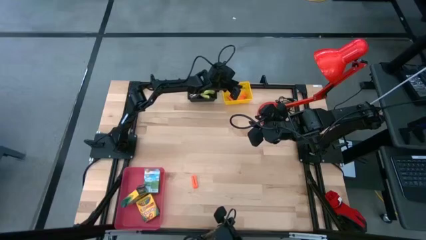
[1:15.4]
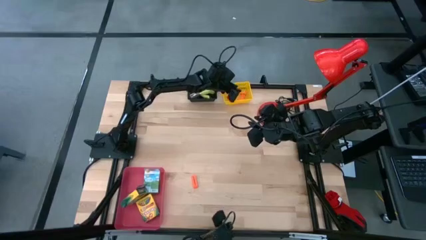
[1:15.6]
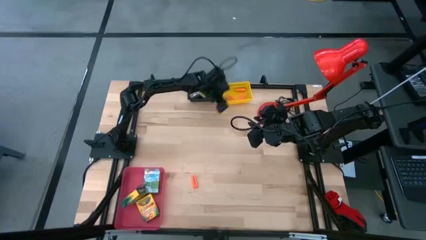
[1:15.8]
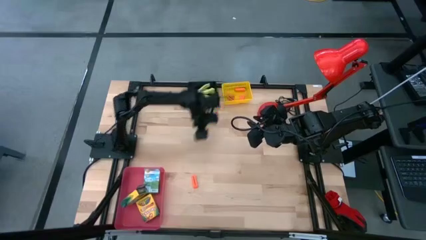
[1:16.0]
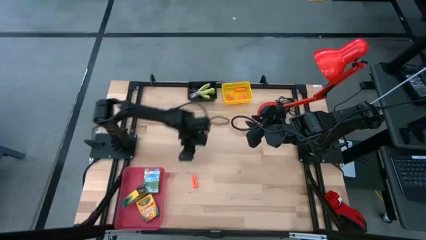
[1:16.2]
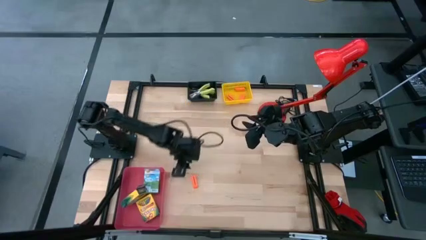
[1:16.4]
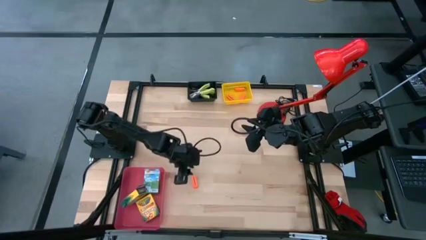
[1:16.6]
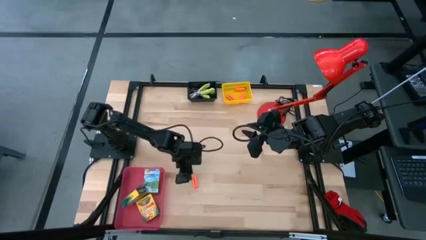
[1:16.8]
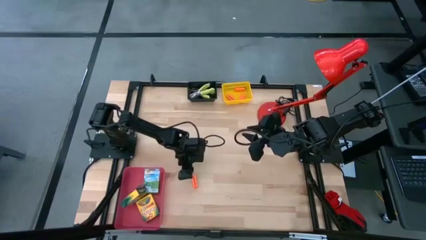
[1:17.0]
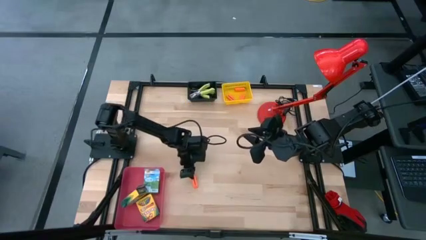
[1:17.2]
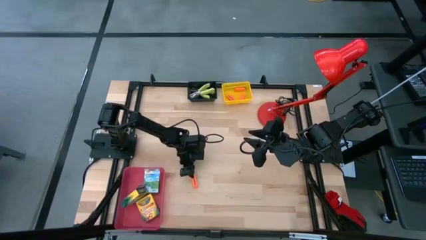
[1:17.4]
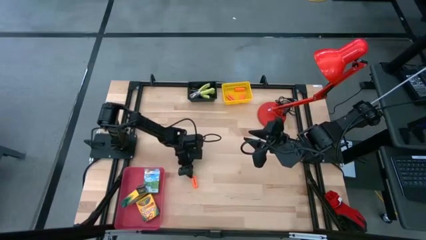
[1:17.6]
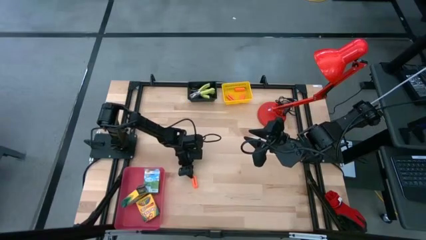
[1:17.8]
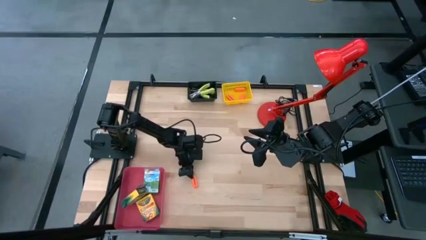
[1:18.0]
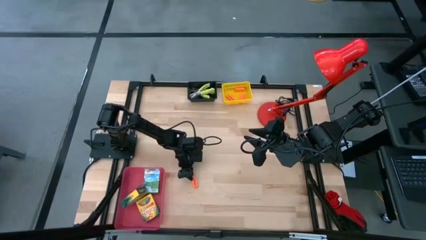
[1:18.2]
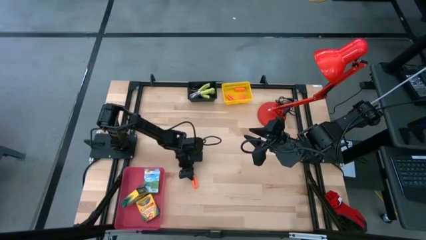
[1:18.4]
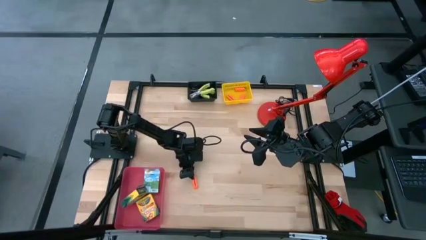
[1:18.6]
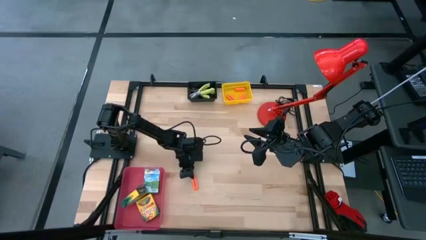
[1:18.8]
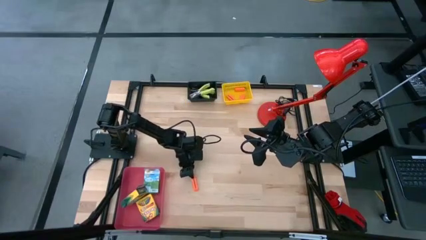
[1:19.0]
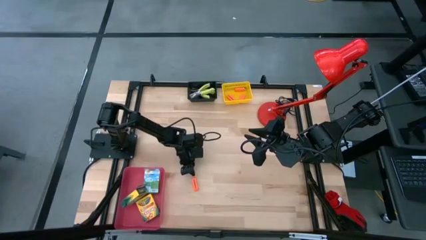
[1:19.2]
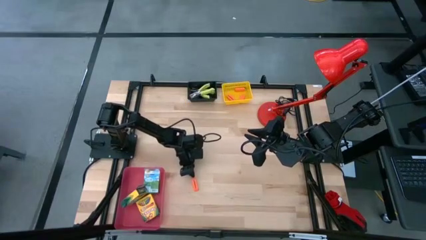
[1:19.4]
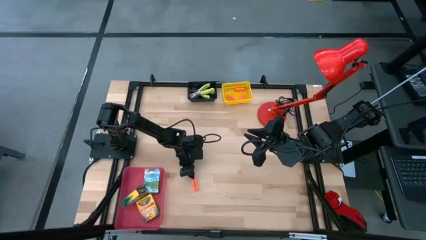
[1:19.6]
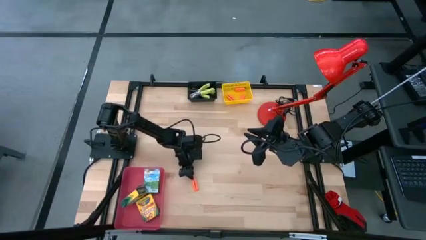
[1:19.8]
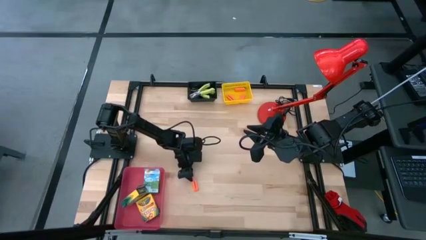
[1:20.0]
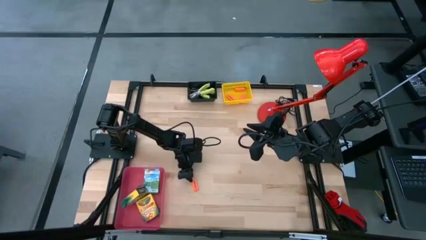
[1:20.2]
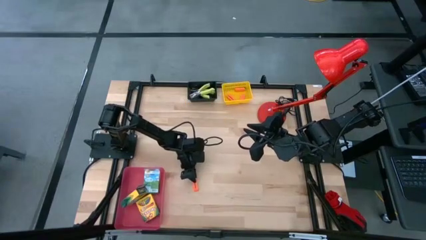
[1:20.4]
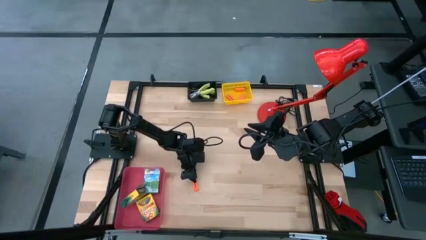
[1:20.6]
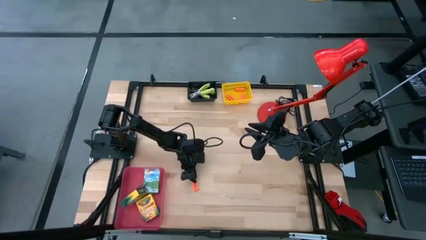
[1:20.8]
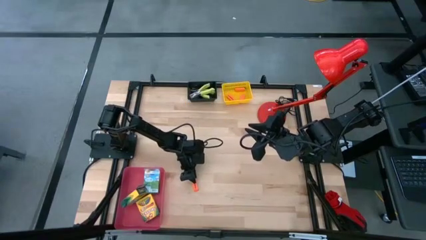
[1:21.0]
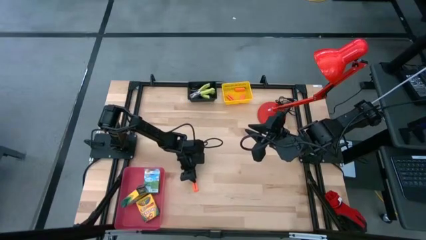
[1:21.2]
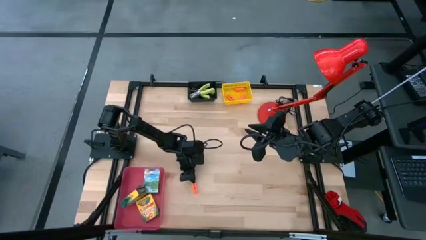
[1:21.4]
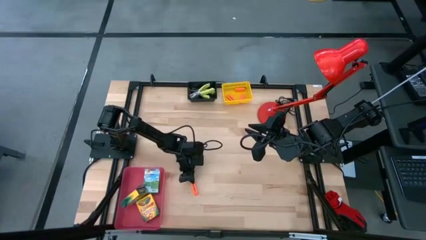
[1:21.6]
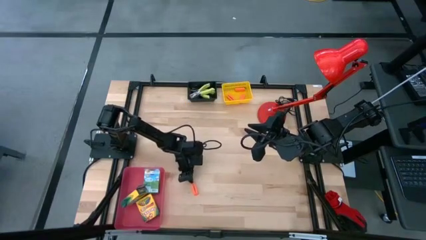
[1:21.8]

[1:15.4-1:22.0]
Task: Pick & Place School Supplies
Put the orange eraser into the yellow bin

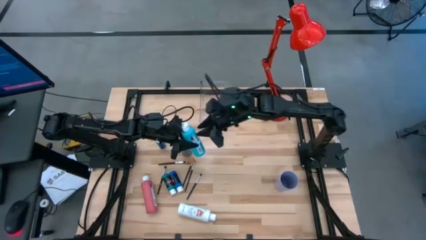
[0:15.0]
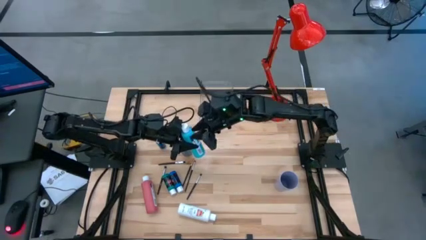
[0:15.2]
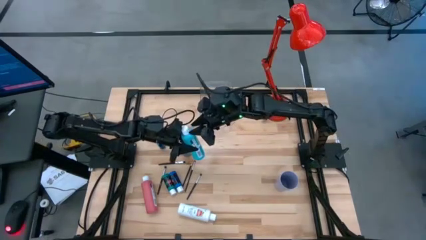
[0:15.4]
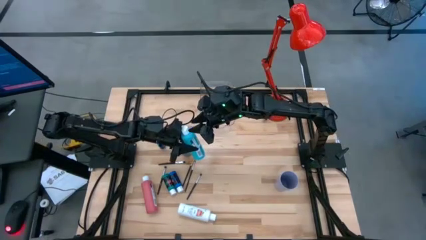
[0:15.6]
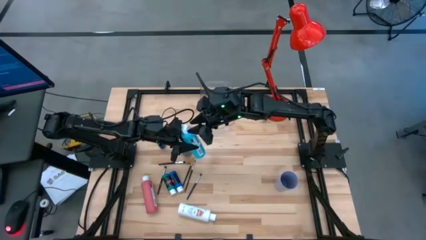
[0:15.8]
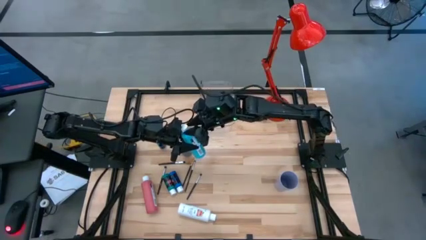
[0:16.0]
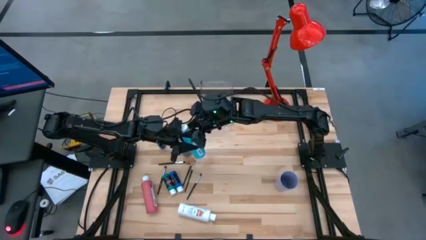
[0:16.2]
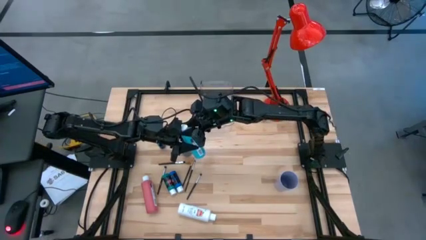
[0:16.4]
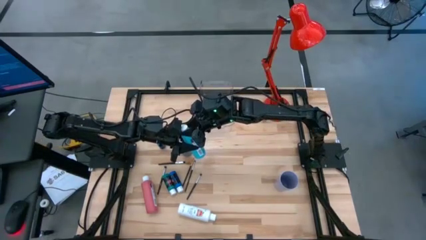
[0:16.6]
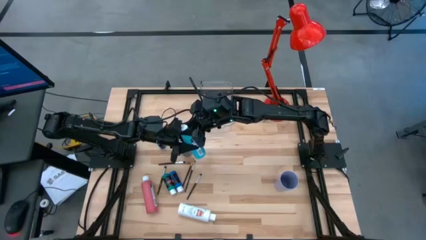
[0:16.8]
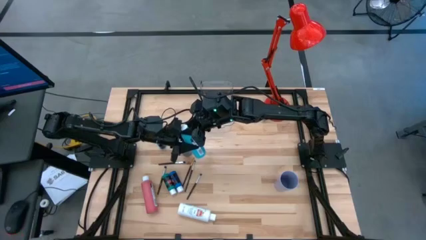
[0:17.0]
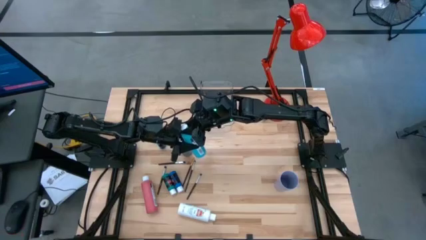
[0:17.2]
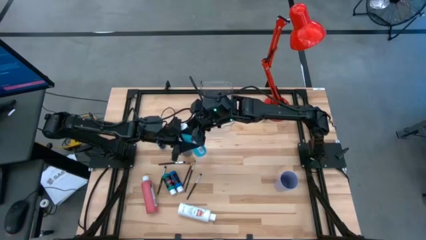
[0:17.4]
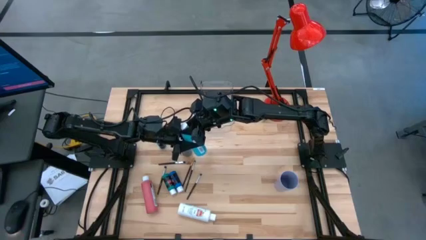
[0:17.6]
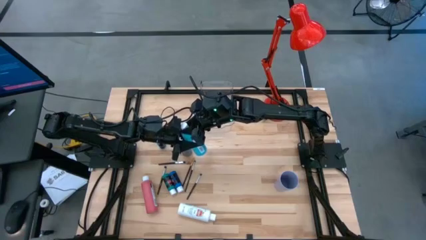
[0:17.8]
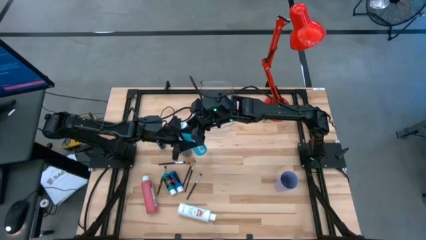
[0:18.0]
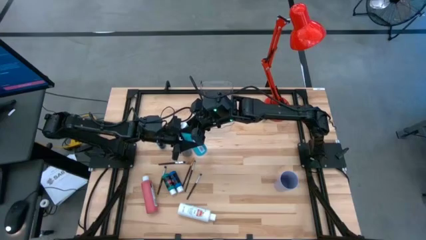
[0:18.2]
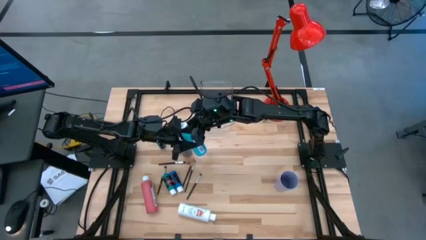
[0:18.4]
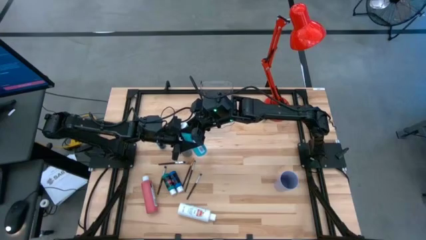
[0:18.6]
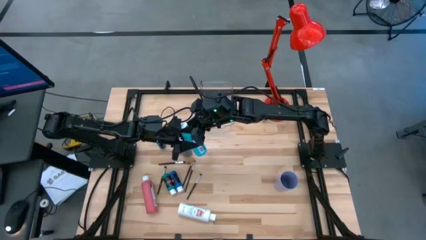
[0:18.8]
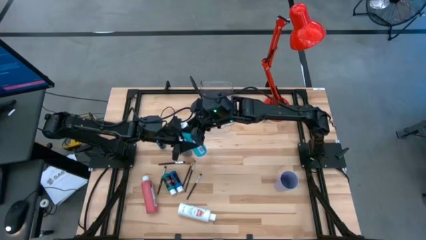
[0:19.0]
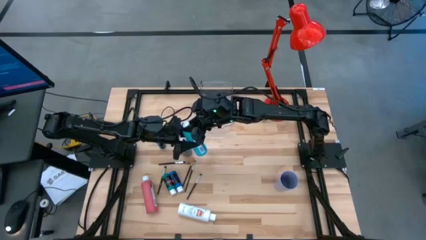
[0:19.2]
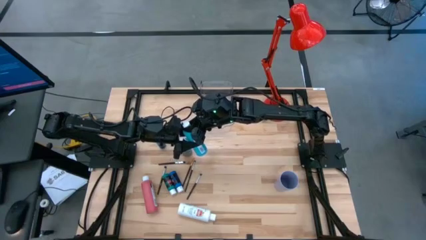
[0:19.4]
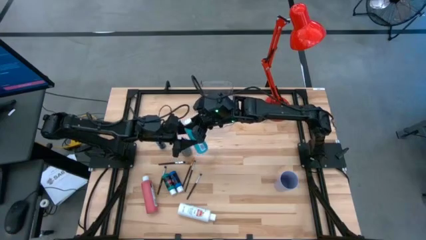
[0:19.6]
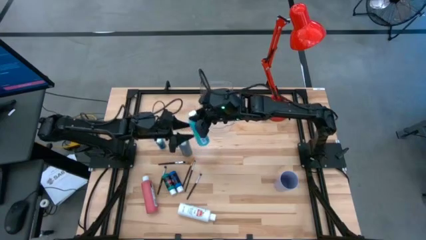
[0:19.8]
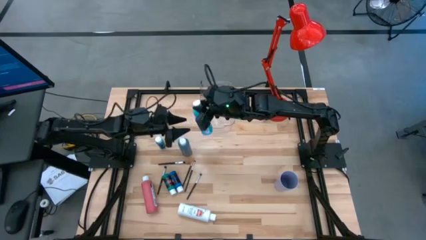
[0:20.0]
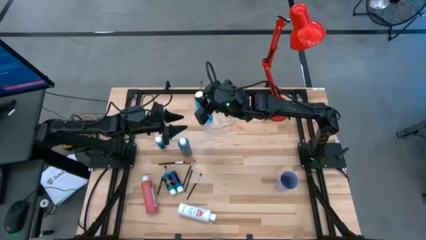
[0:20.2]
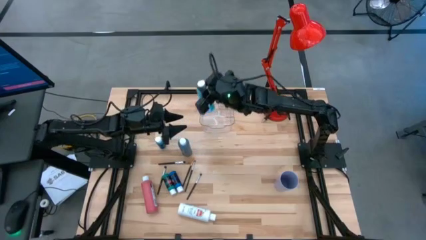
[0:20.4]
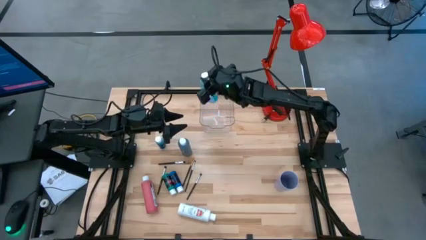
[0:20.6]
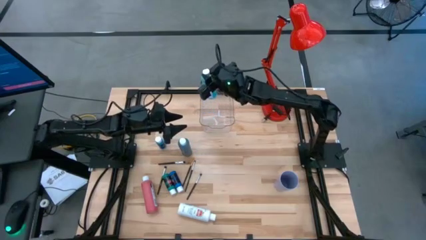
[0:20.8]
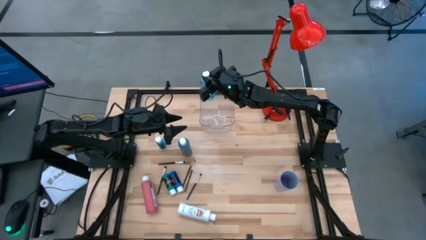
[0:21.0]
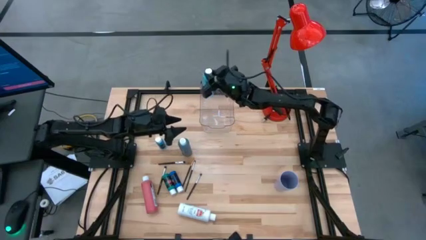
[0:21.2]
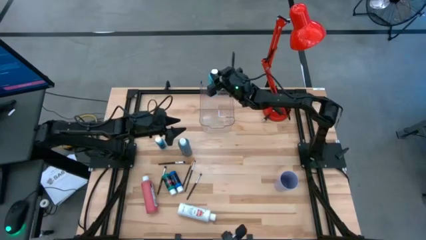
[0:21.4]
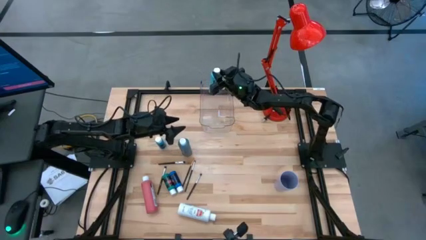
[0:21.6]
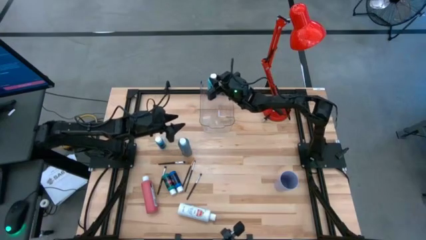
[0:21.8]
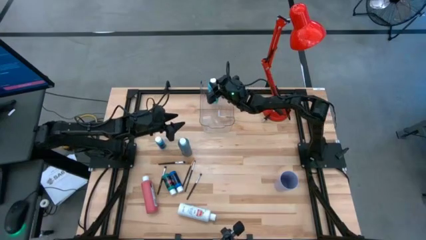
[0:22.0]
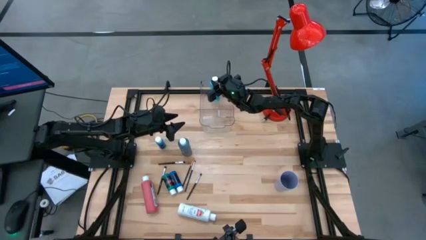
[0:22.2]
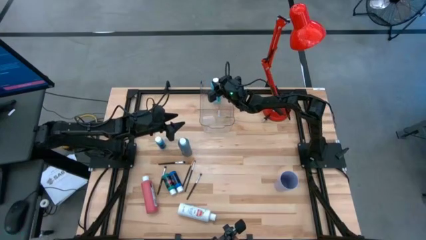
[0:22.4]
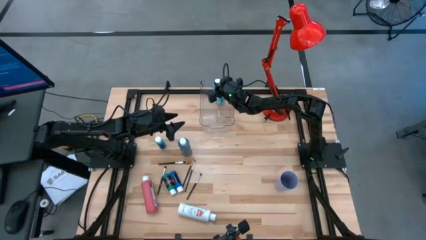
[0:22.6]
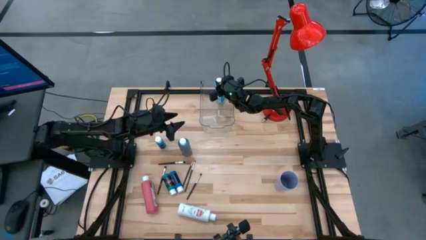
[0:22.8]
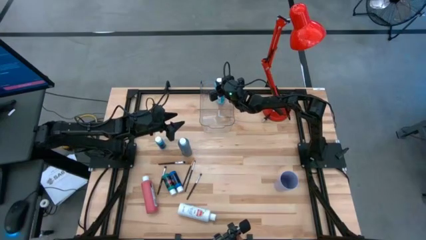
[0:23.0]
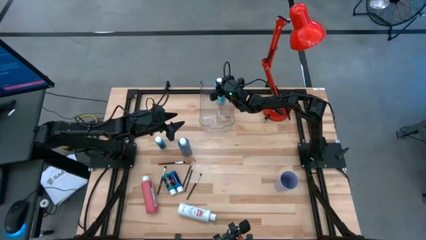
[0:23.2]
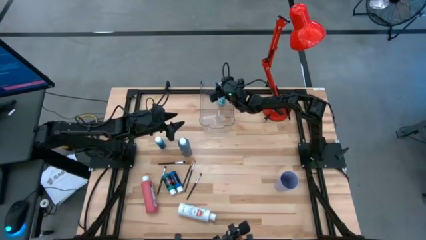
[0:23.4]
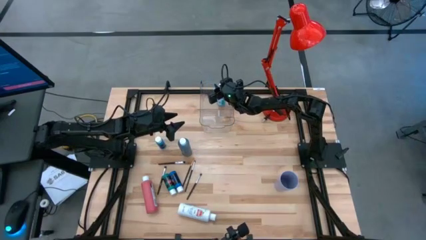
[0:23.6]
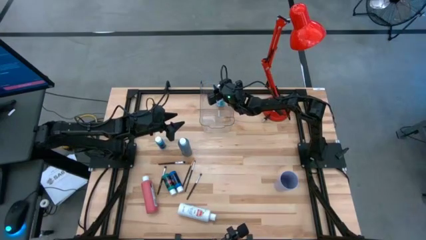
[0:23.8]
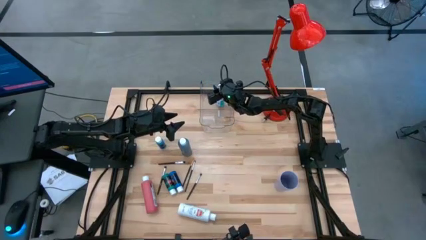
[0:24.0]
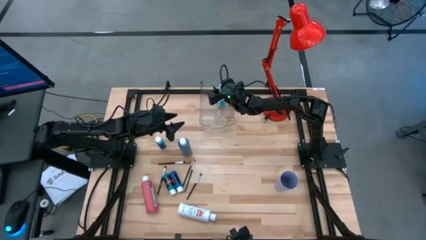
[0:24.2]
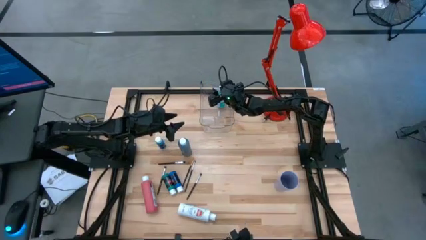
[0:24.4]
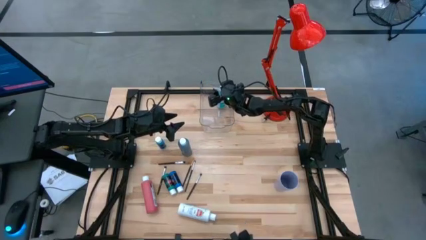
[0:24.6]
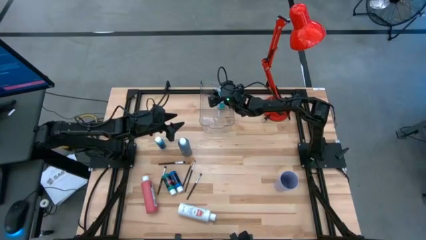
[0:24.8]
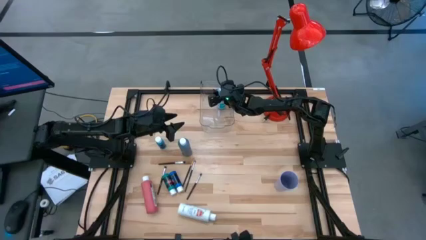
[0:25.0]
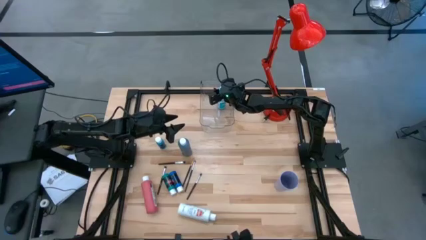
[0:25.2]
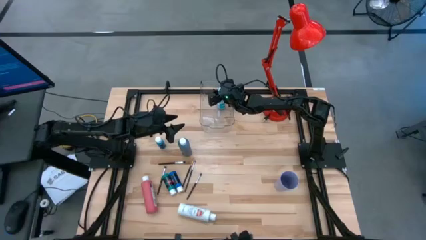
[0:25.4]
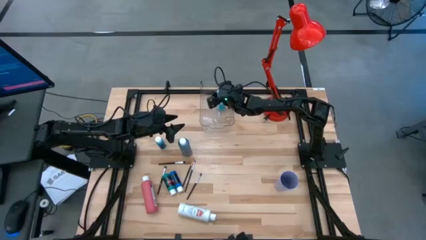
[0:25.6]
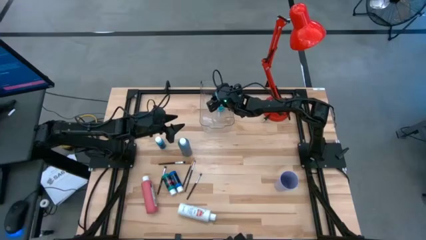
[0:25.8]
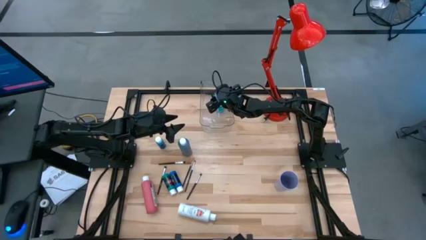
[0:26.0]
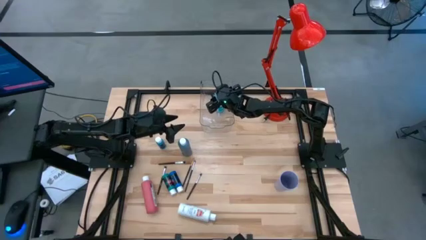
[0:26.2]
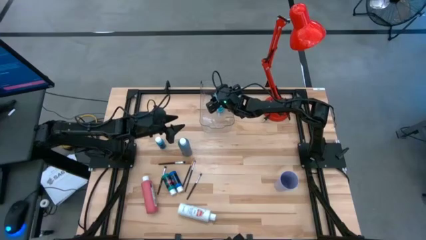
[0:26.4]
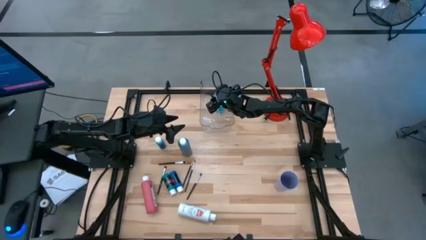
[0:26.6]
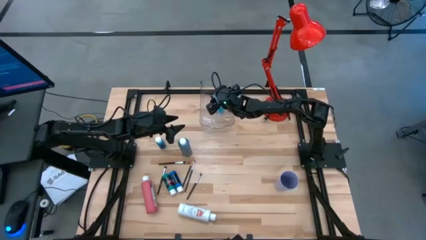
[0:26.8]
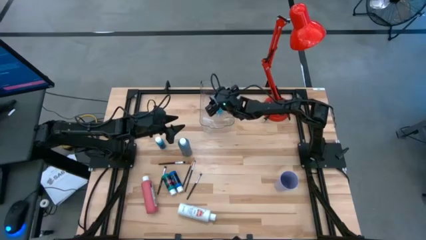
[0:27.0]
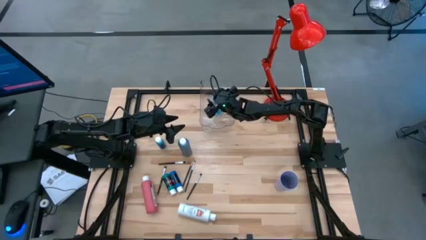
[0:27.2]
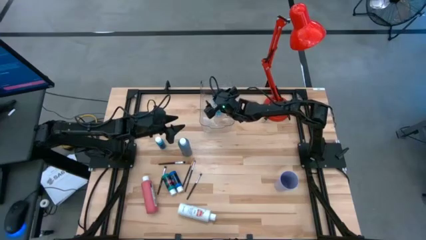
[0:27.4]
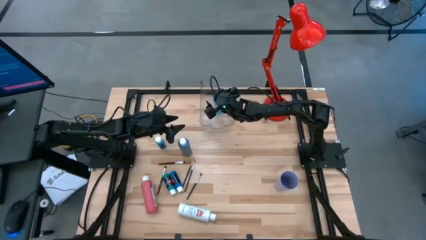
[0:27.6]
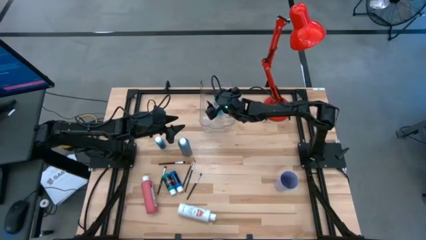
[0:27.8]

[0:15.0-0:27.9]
Task: Pick & Place Paint Supplies
Put the light blue paint bottle into the transparent bin
